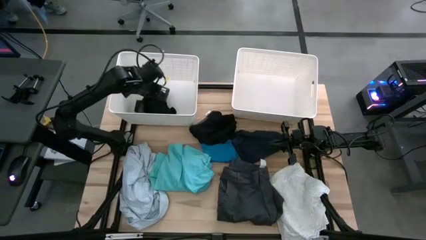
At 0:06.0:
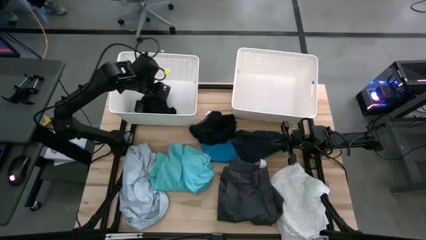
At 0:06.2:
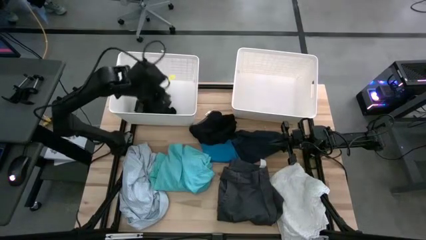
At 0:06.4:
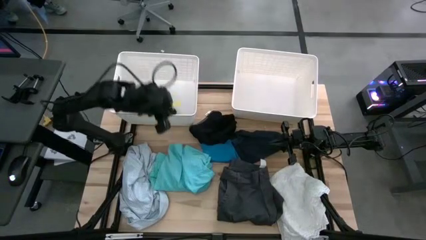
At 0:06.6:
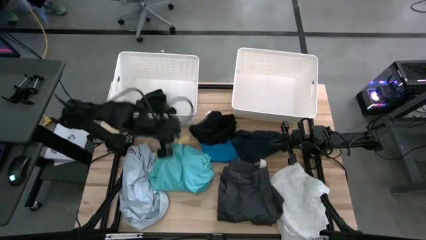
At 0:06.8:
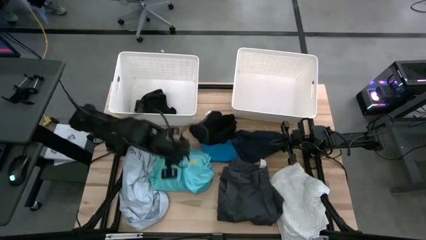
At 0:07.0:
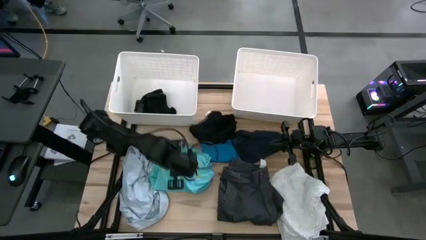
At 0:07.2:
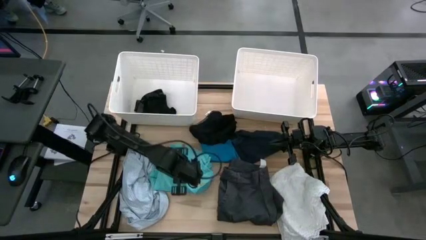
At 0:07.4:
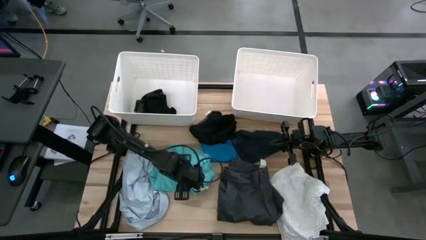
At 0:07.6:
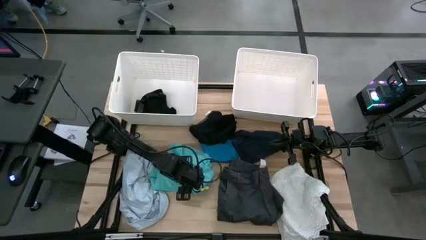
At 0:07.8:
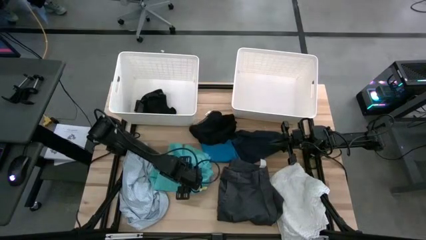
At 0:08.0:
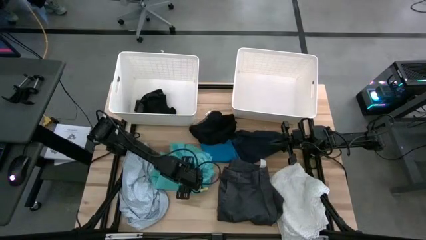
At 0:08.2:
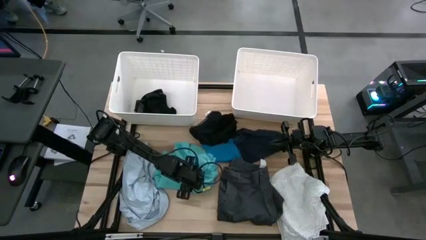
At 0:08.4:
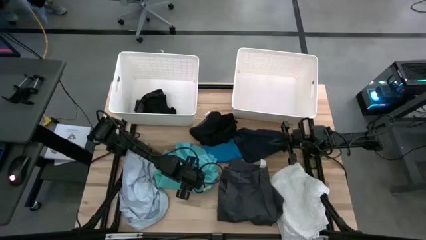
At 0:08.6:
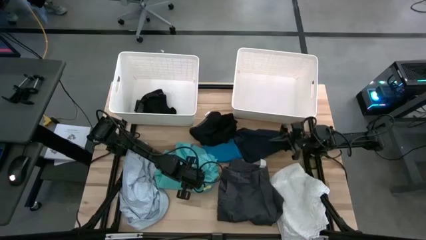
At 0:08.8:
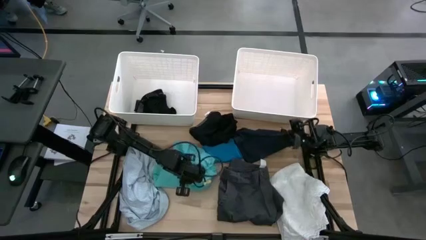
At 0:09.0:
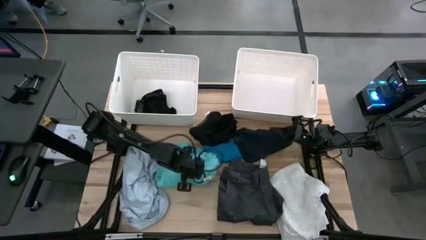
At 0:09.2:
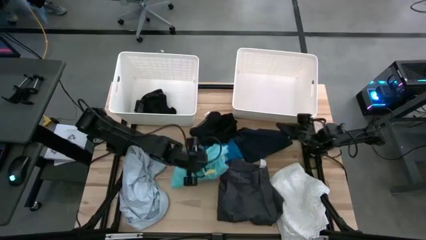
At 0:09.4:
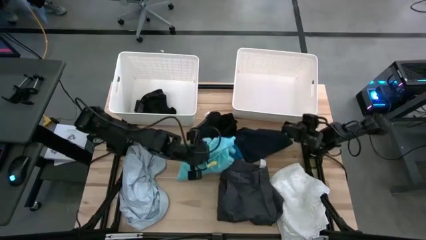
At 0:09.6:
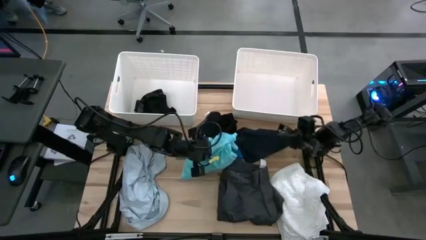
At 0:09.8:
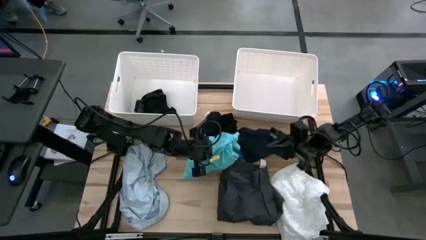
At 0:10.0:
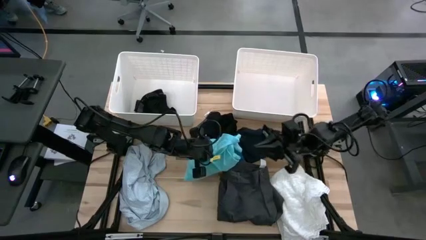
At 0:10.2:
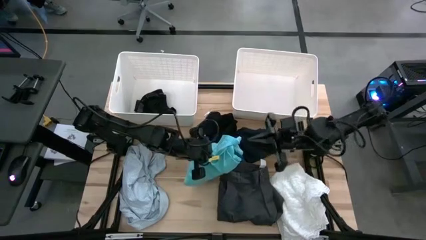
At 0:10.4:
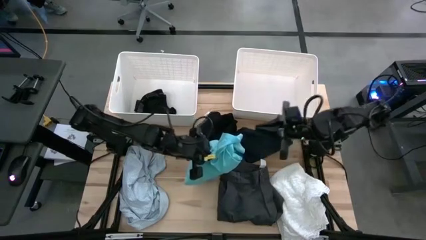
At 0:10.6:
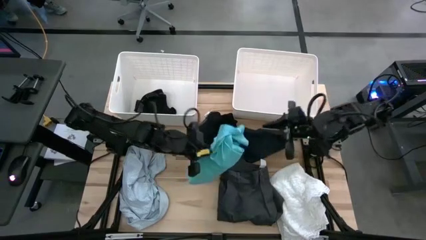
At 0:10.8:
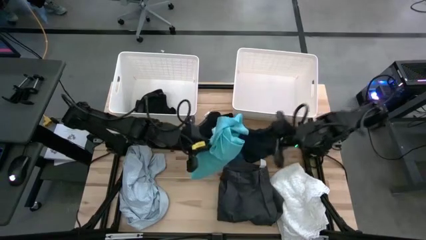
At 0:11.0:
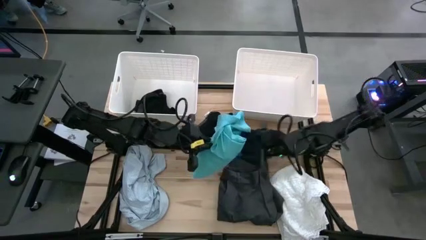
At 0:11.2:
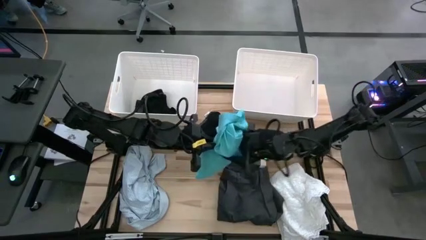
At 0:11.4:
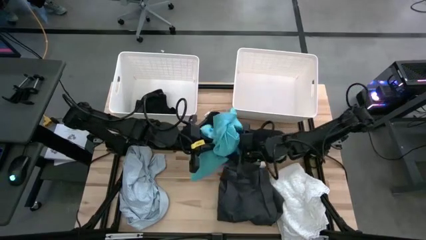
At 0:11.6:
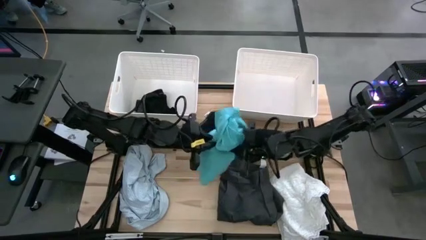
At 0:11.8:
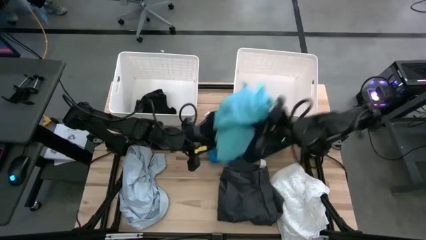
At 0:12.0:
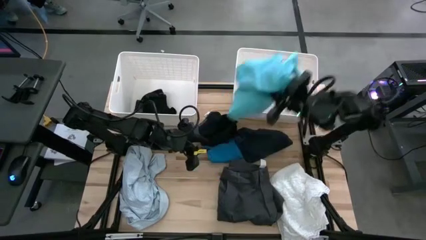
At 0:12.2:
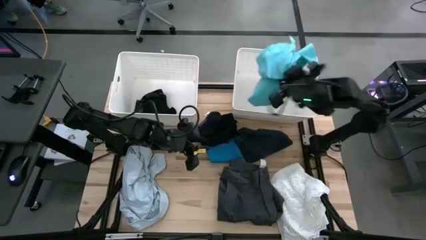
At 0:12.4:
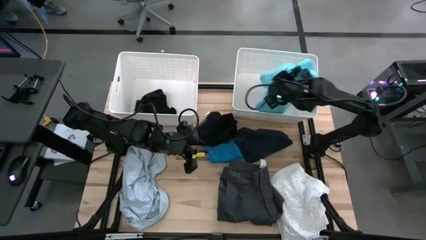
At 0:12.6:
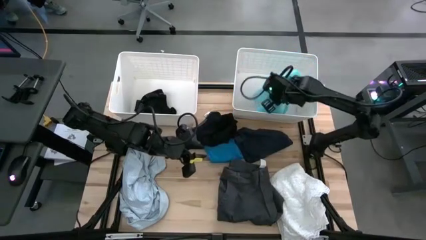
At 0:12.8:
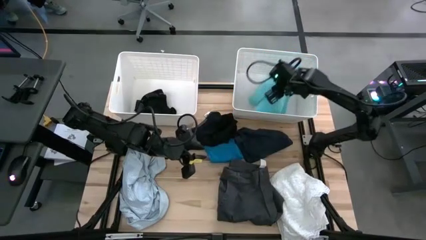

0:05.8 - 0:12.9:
Task: Sort clothes
Put the light blue short into the right laundry bin

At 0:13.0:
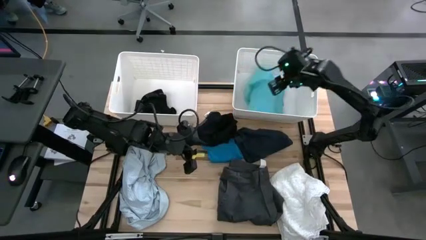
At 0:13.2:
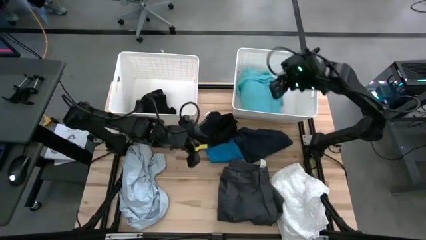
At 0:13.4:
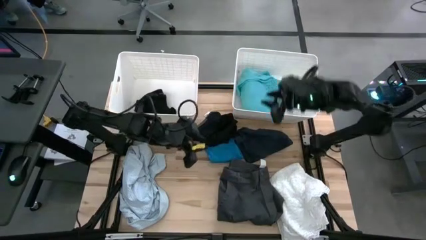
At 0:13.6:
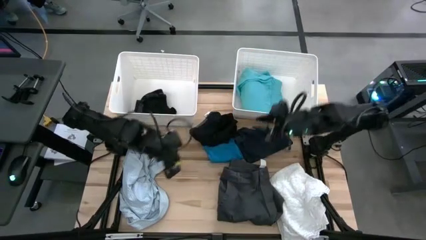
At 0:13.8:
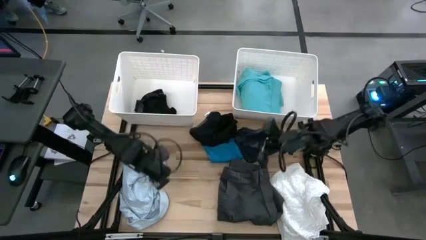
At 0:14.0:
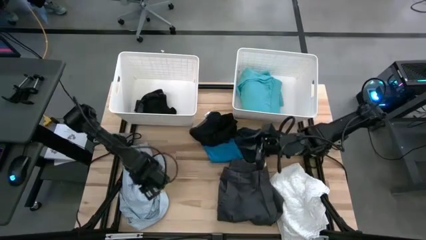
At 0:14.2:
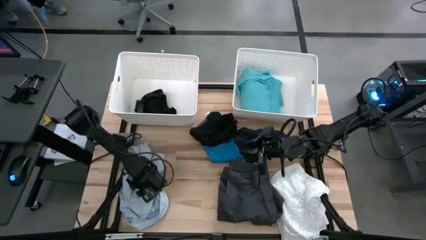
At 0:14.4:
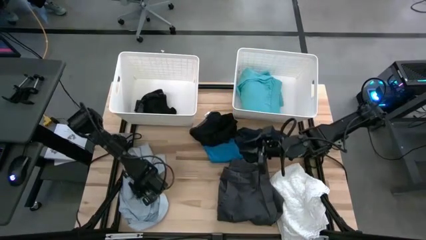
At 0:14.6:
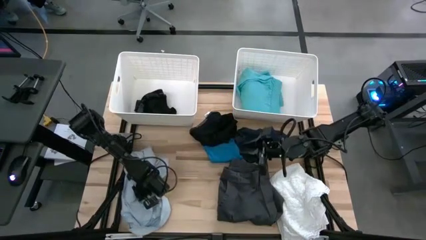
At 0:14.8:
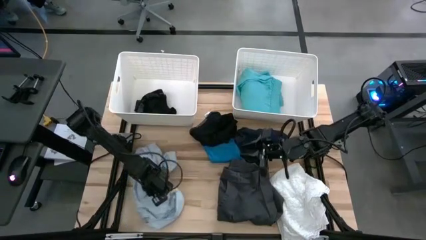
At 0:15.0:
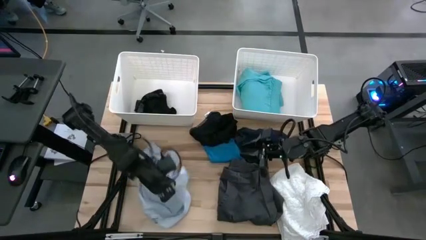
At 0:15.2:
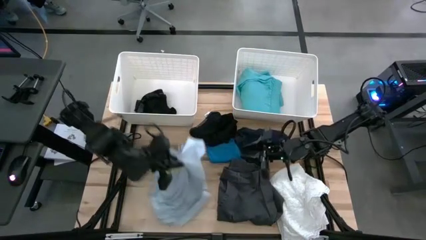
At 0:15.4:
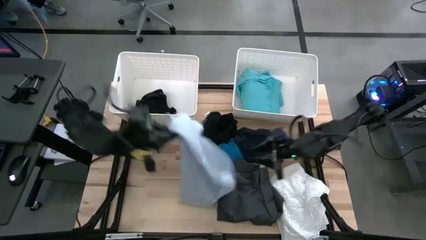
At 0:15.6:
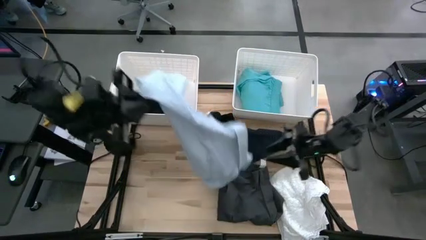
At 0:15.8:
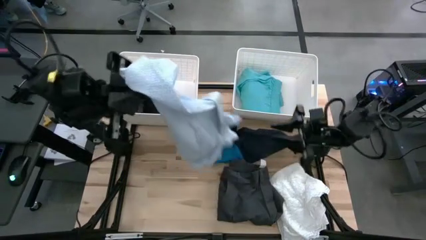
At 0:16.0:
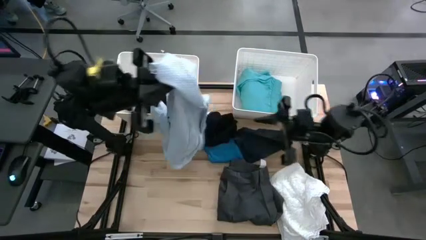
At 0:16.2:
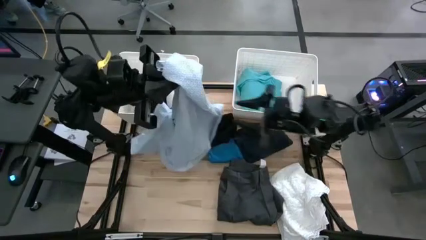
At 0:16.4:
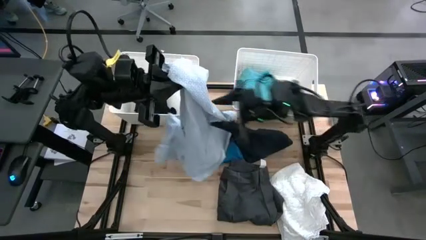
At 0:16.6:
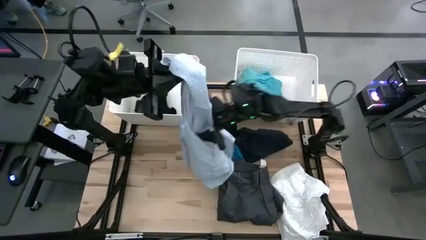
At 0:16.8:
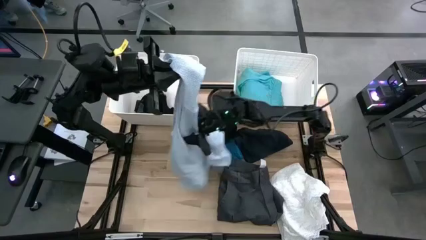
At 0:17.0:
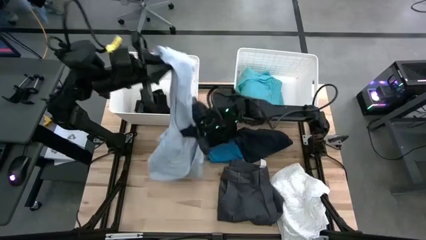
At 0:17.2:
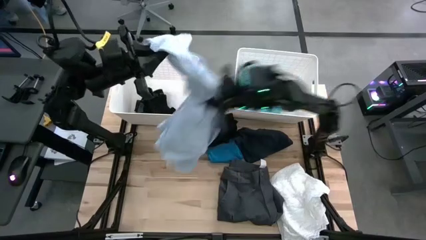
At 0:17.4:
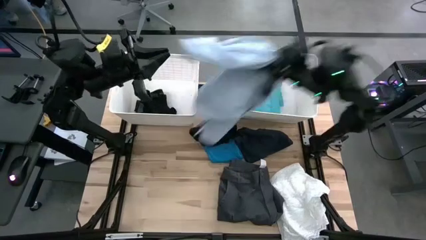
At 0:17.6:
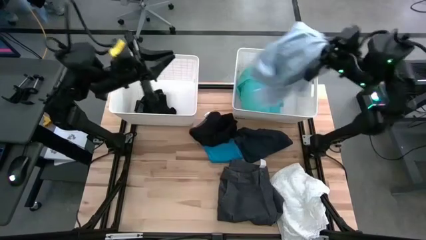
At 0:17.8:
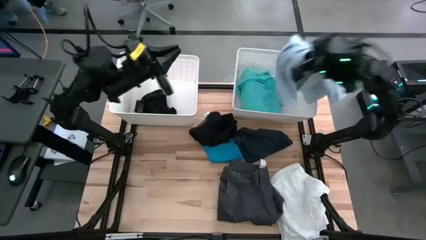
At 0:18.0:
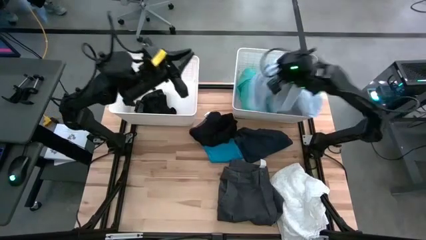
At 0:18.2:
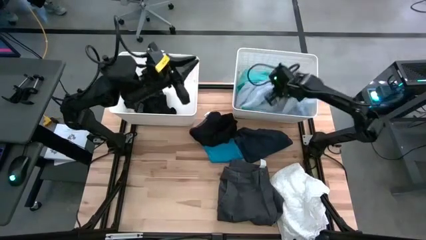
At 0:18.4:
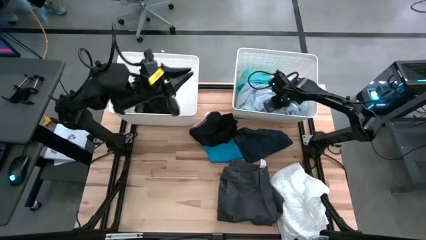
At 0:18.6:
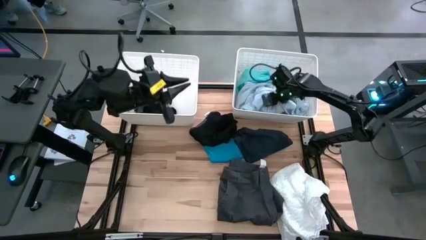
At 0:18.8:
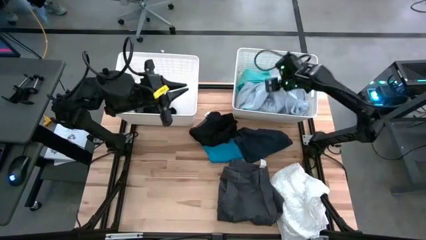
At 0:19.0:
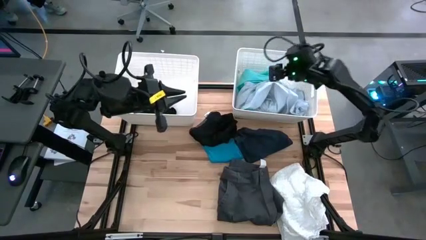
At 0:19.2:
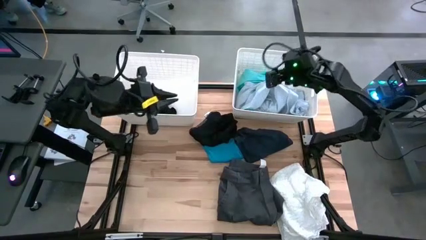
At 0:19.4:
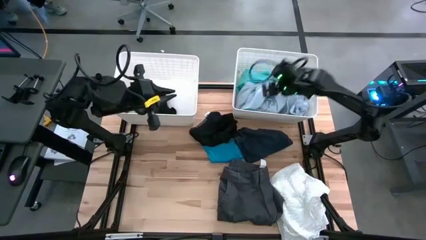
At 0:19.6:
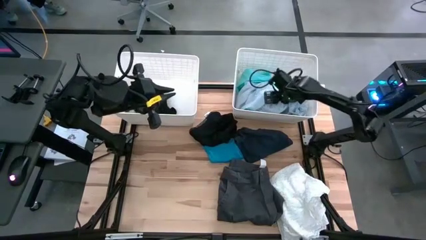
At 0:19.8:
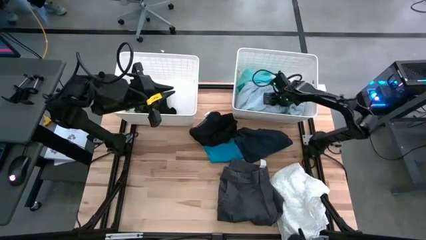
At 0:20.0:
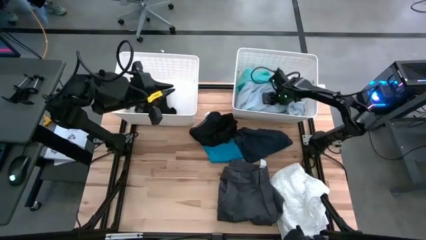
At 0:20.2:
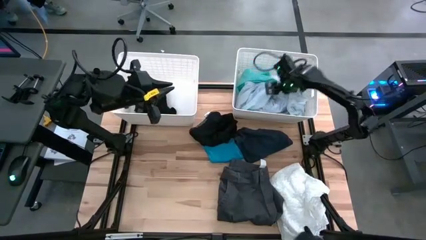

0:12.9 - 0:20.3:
Put the blue patterned short into the right laundry bin

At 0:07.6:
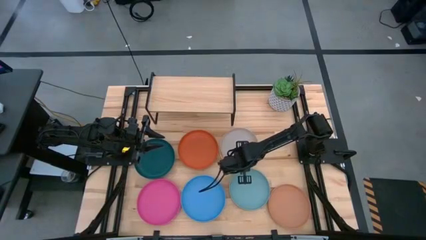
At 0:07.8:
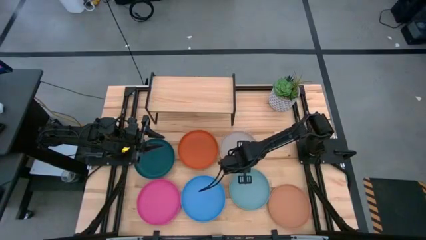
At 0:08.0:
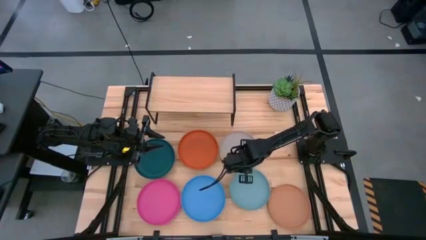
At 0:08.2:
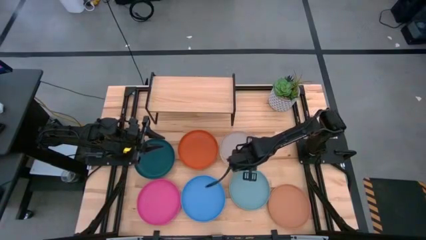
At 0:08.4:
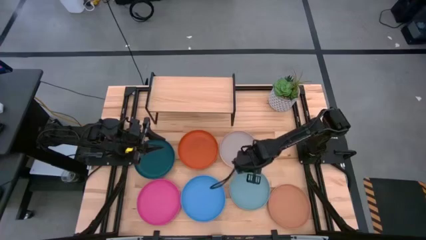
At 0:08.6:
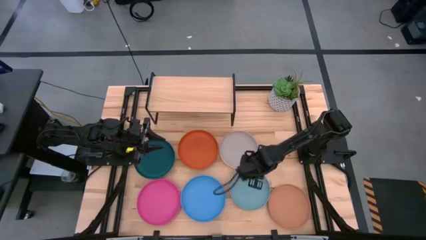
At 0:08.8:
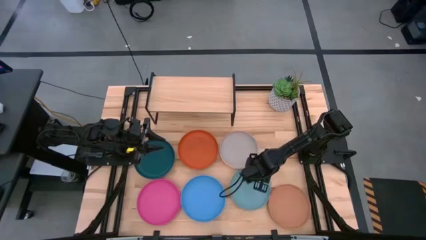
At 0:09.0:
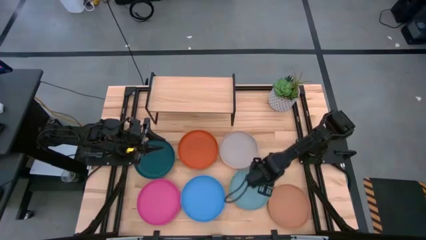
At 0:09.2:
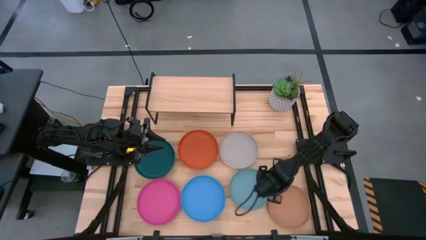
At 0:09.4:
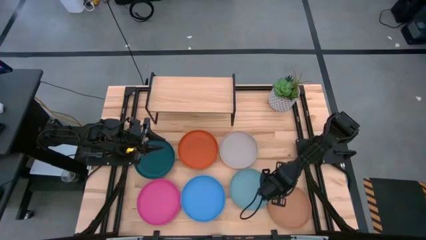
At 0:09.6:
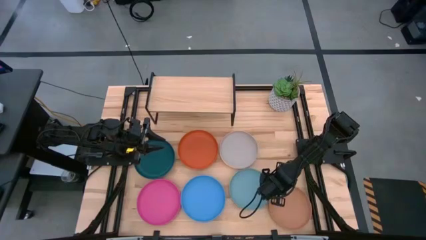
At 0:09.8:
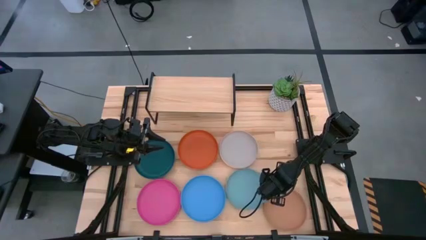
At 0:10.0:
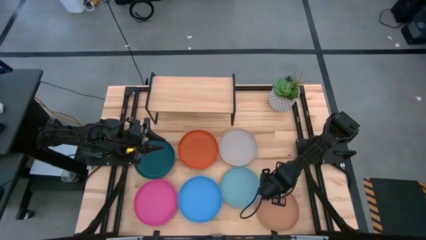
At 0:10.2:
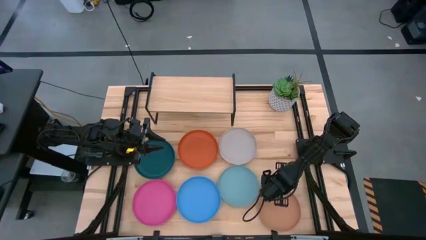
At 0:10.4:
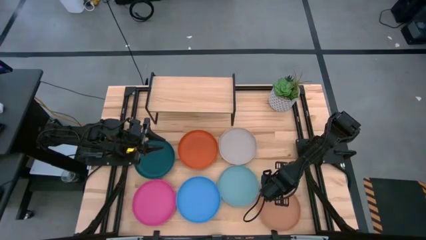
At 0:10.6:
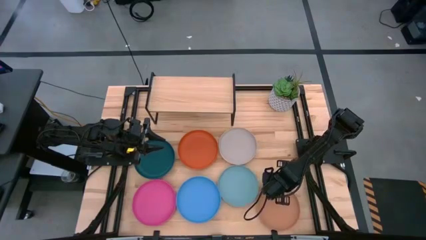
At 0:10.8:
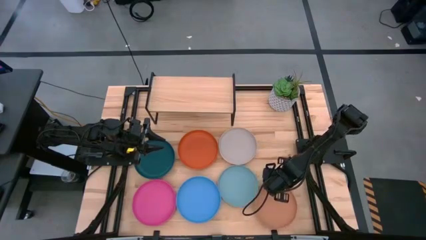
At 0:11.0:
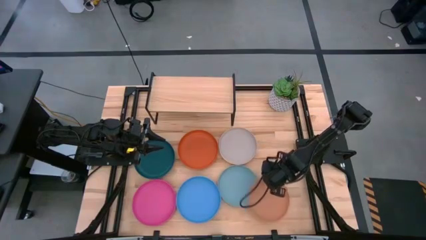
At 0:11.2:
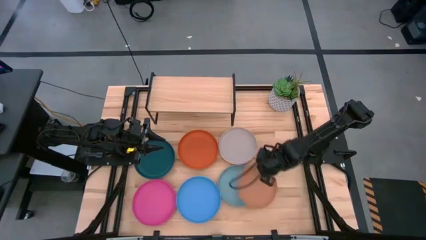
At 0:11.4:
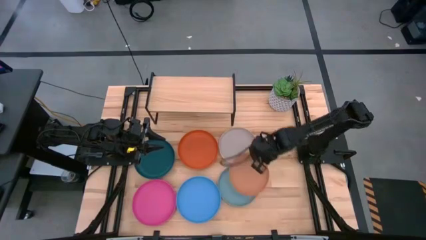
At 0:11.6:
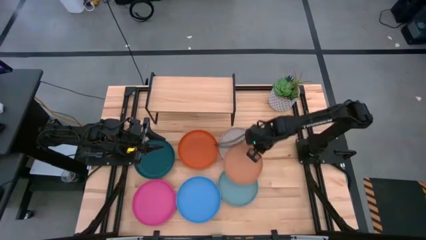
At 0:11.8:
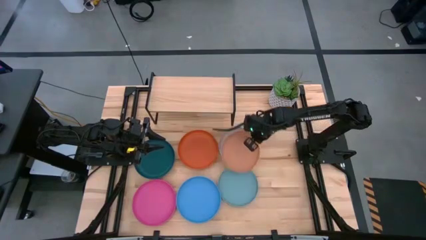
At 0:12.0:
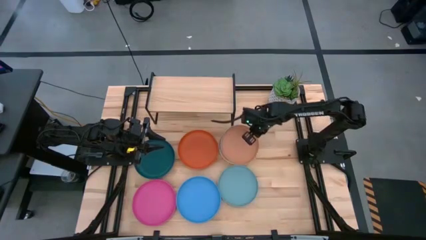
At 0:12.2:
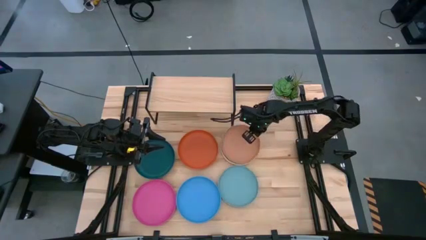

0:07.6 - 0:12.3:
Task: Place and stack plates onto a shelf
Stack the brown plate on top of the light orange plate
